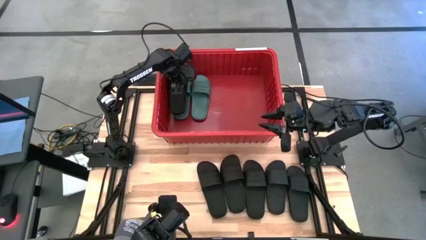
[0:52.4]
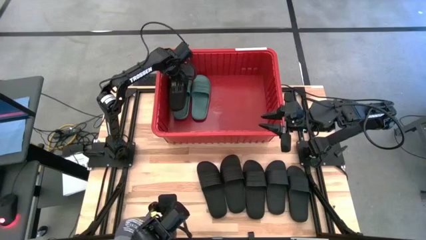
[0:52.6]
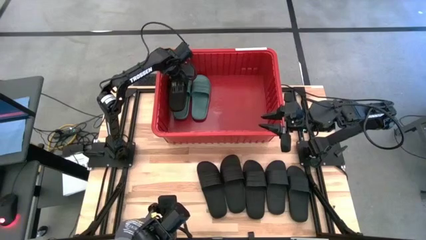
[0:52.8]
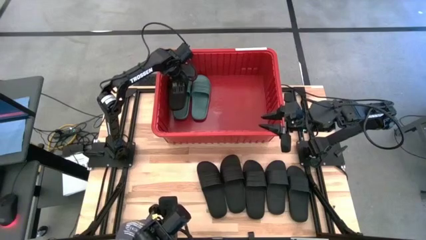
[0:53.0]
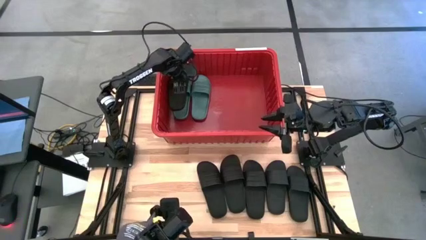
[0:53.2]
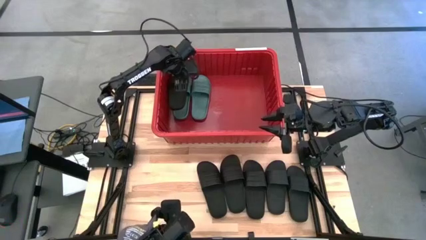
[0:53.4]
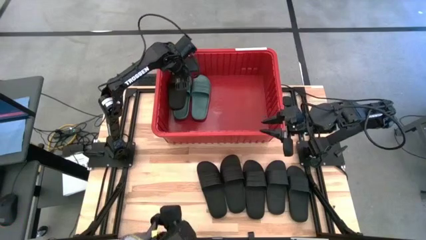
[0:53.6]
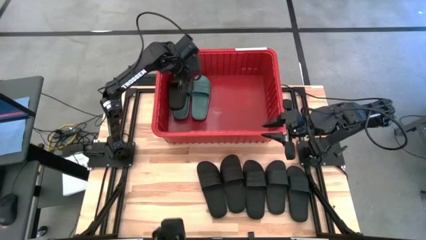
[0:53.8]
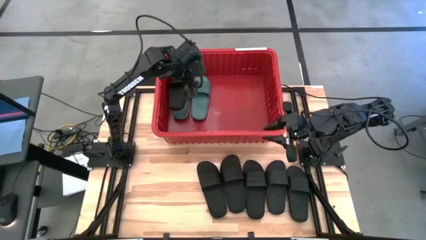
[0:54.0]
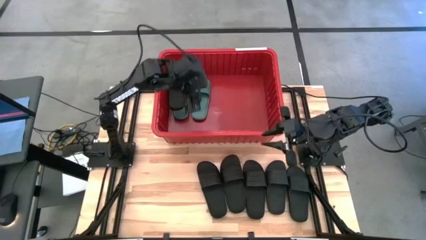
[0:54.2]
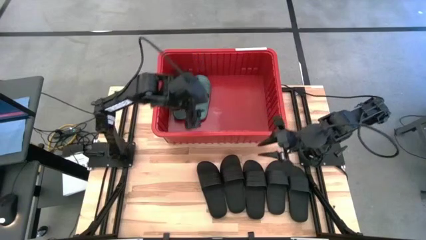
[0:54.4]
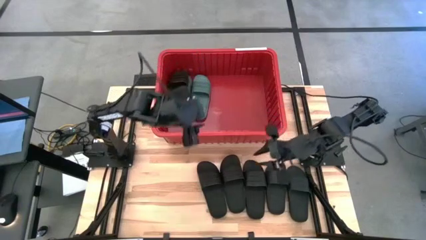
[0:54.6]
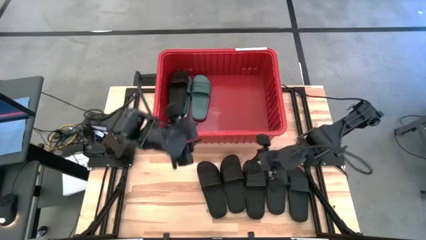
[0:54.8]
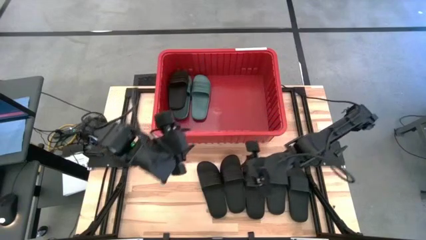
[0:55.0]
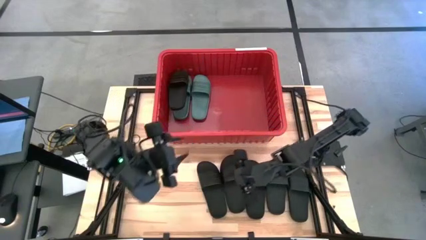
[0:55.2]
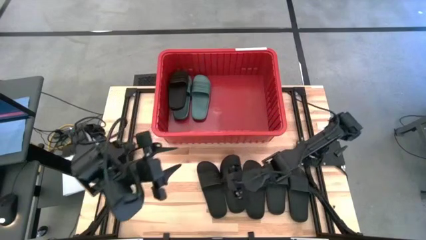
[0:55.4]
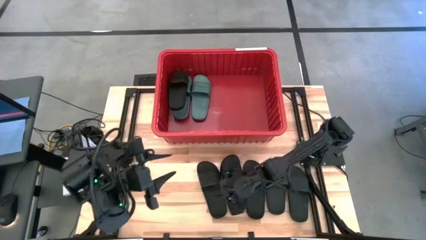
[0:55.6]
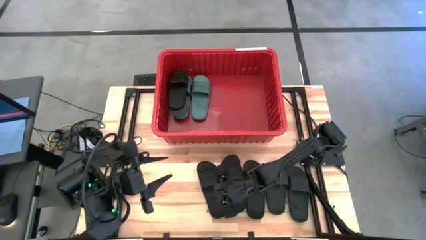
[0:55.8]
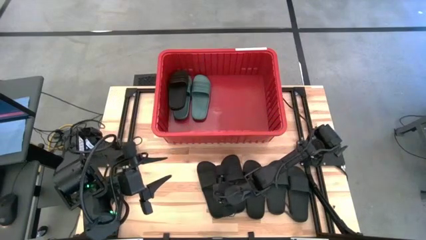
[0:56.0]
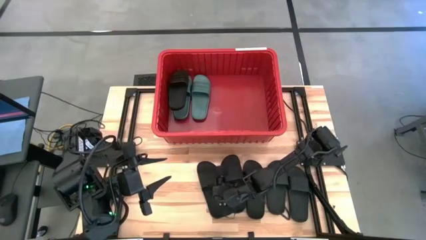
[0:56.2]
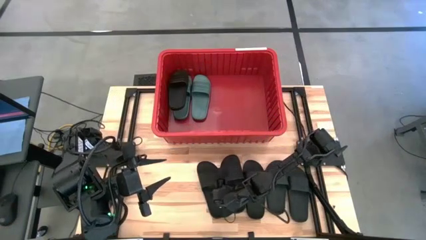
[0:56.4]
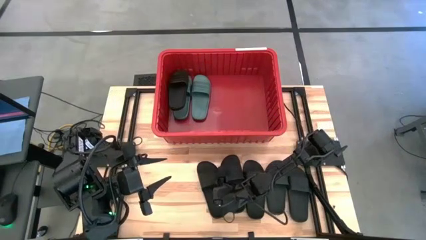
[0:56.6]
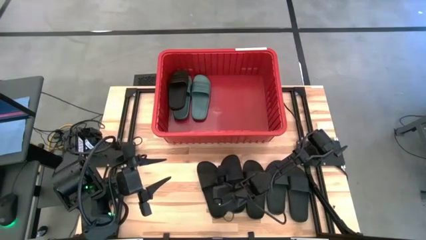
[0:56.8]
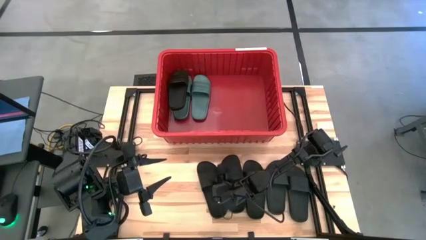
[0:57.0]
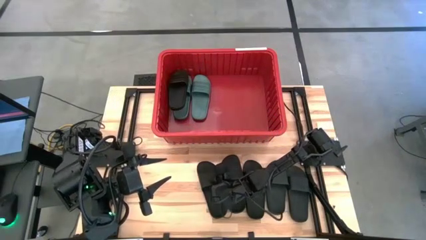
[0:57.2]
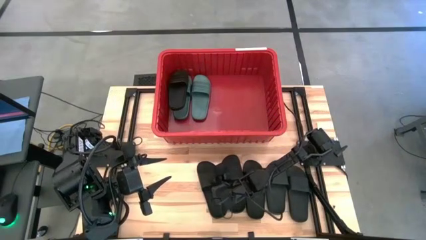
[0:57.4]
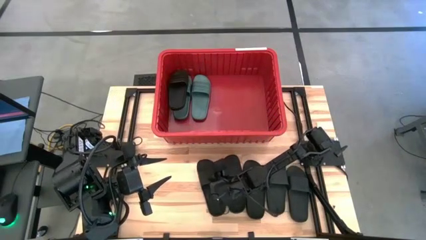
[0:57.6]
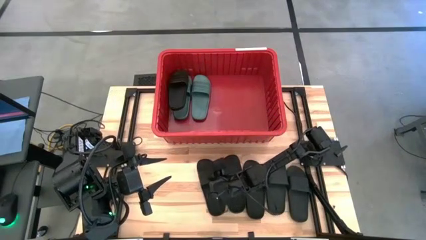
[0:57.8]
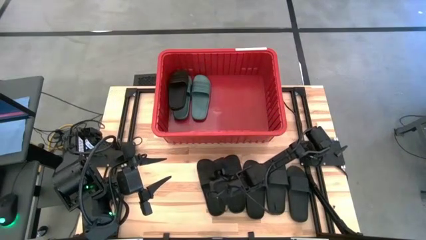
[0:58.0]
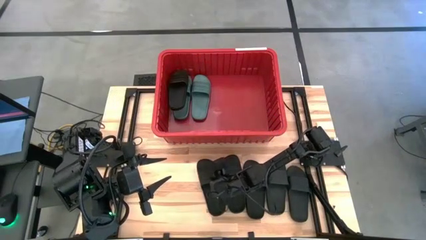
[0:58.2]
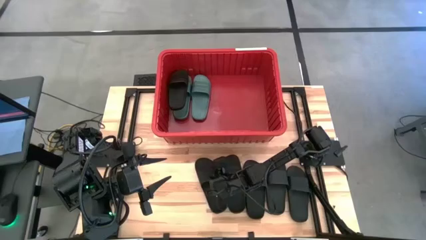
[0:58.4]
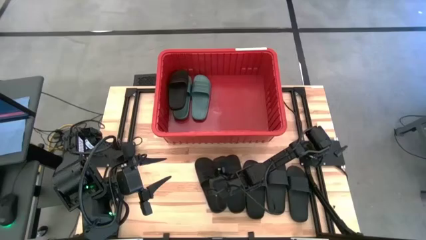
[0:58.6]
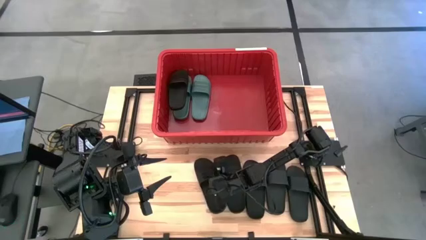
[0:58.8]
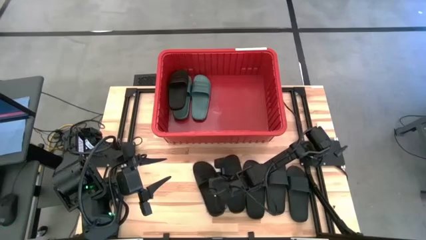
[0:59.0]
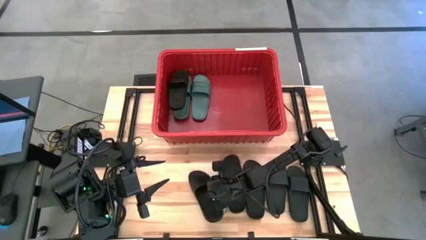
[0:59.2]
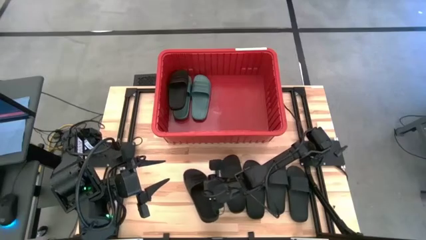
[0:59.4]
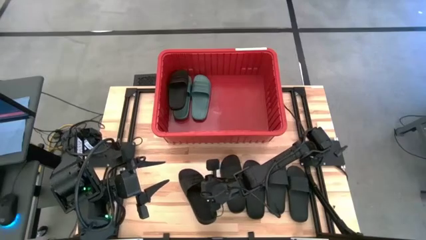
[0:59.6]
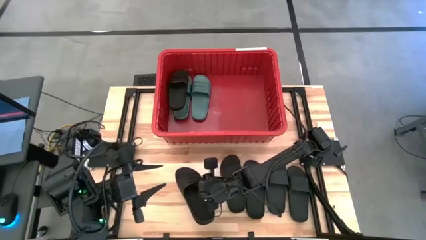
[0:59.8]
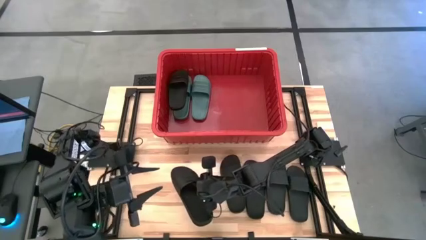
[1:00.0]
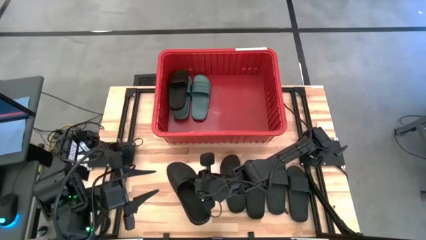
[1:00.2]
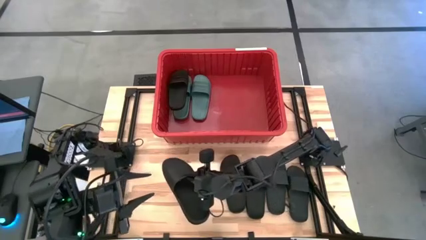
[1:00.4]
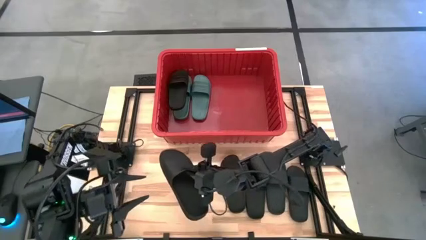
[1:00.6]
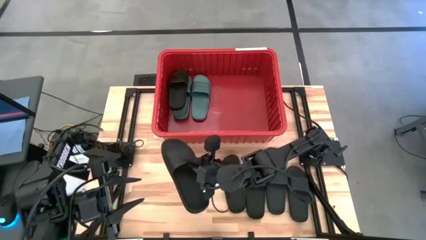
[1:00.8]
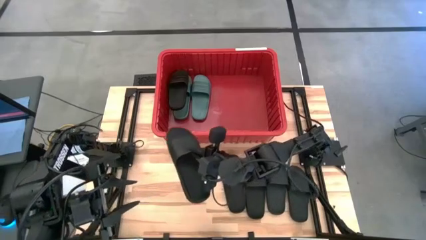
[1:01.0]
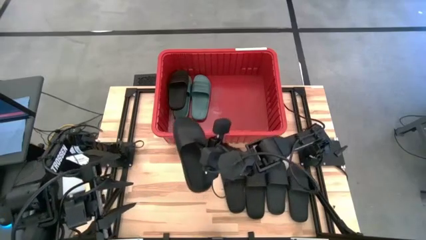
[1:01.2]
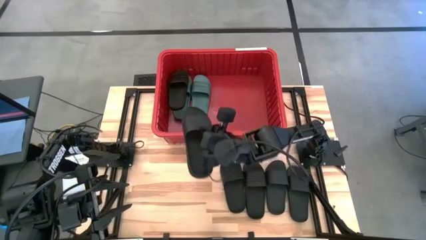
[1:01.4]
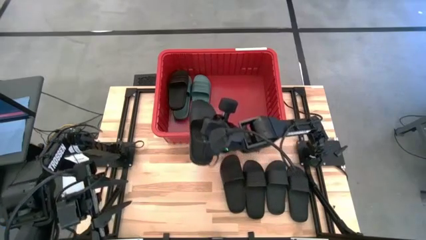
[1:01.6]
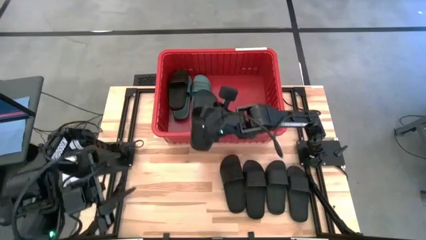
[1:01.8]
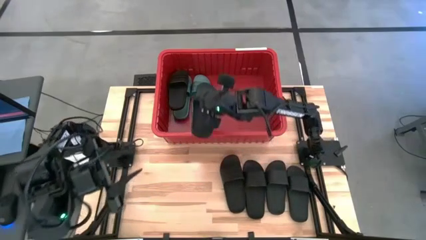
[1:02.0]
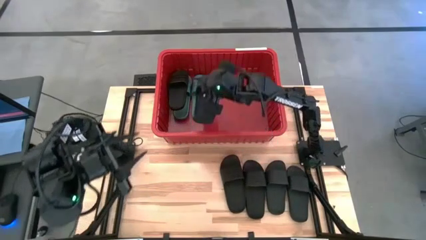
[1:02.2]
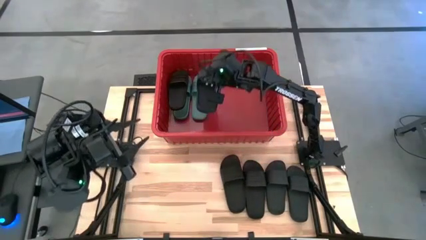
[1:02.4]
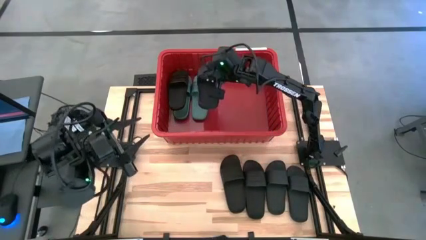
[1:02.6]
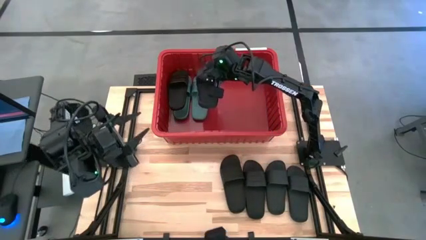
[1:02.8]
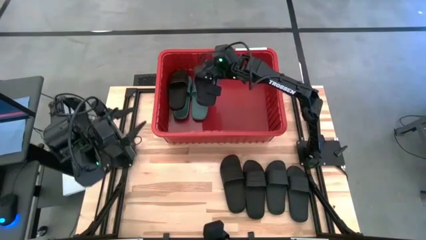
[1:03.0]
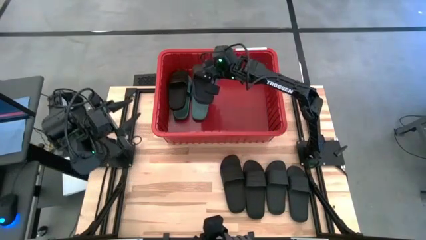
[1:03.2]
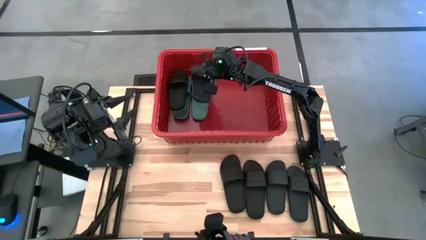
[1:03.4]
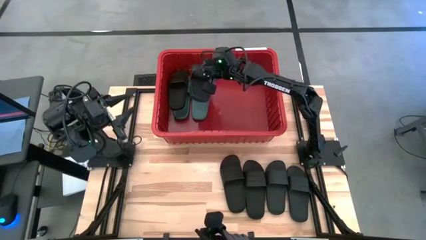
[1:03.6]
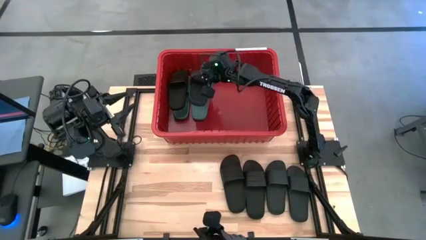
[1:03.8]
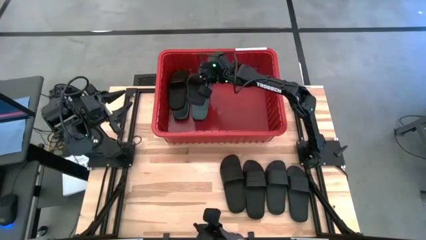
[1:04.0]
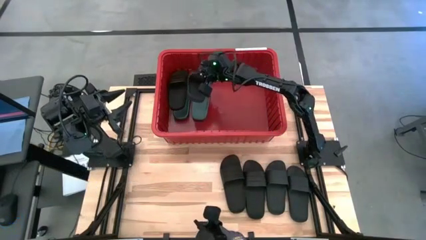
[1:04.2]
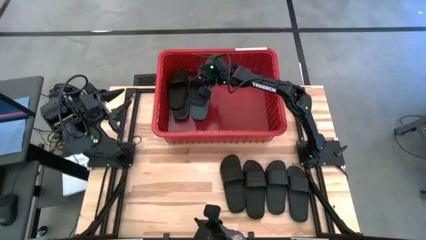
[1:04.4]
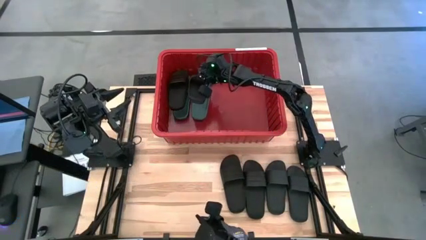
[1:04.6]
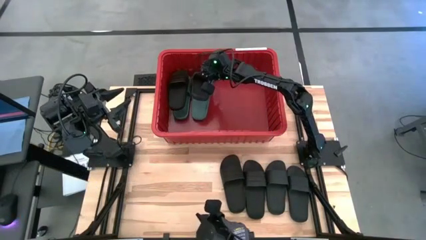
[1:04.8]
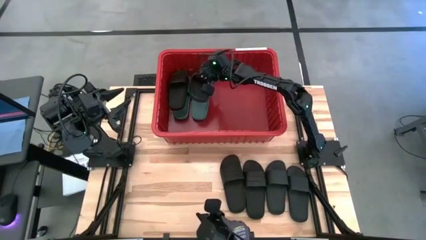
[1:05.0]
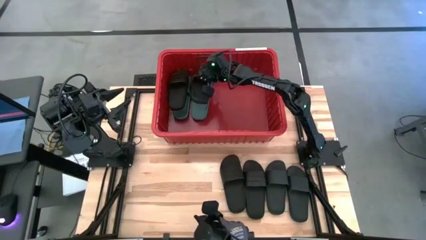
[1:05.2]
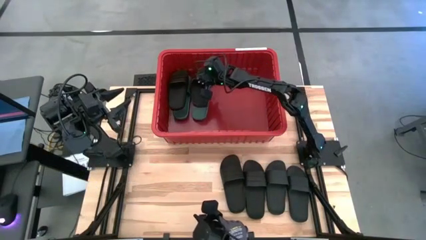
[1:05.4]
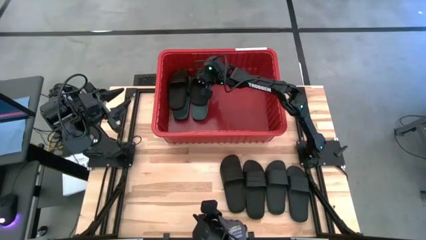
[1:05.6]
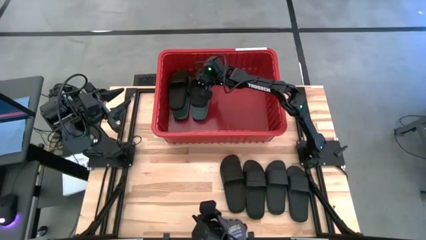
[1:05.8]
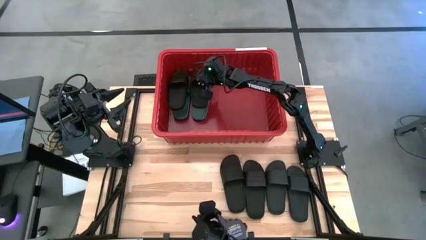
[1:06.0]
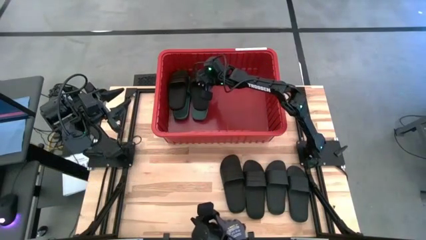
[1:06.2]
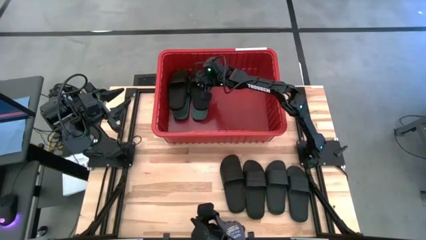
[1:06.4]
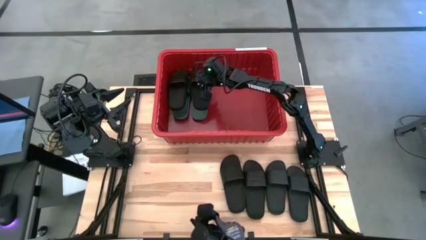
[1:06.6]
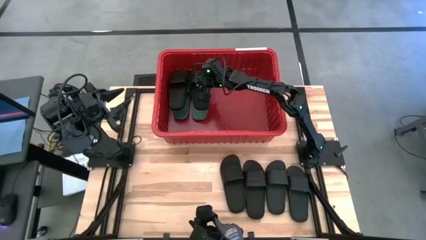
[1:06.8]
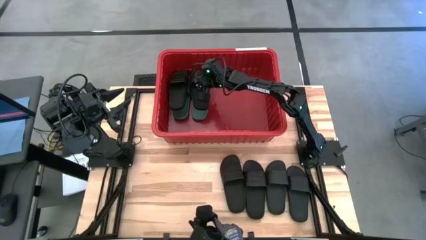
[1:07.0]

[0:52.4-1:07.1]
Task: Pick and place slides into bin
Put the black slide into the red bin

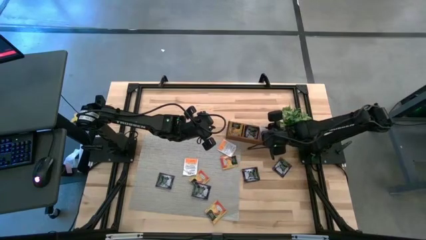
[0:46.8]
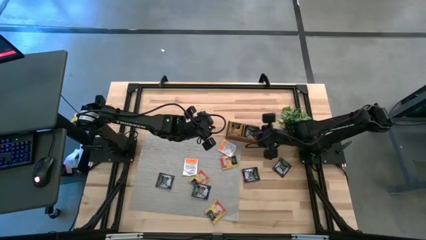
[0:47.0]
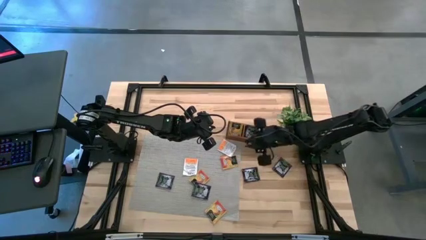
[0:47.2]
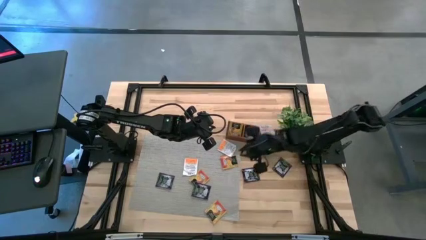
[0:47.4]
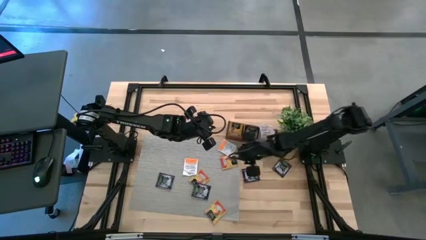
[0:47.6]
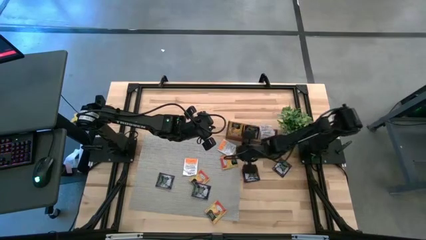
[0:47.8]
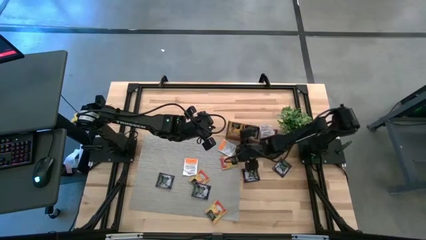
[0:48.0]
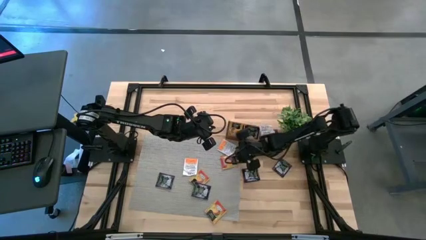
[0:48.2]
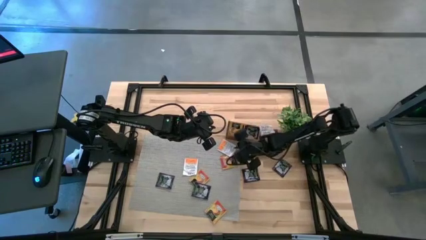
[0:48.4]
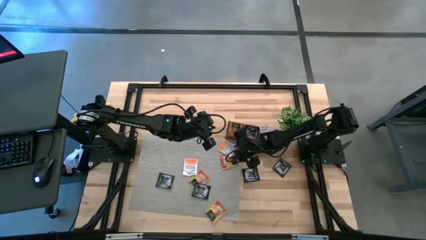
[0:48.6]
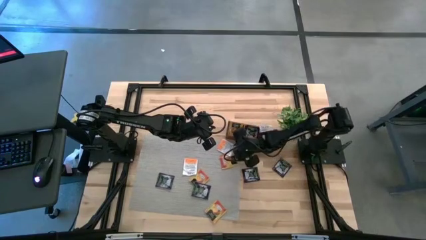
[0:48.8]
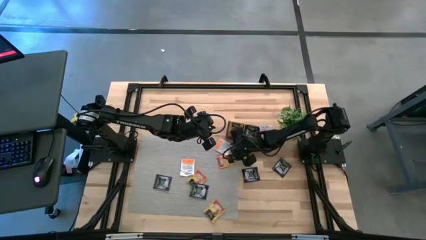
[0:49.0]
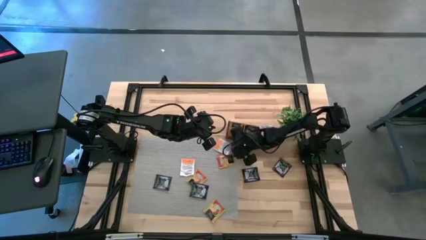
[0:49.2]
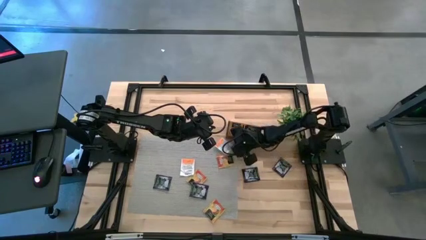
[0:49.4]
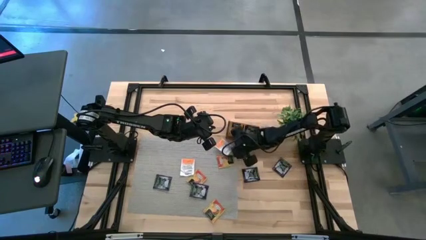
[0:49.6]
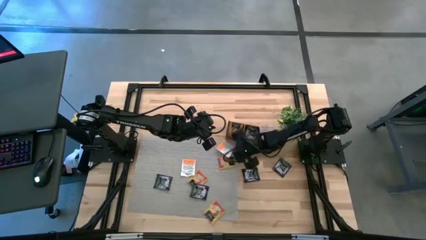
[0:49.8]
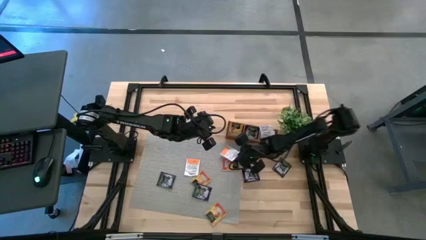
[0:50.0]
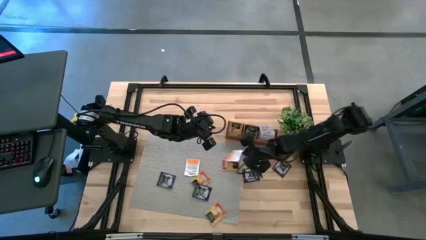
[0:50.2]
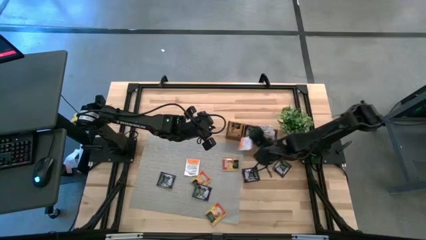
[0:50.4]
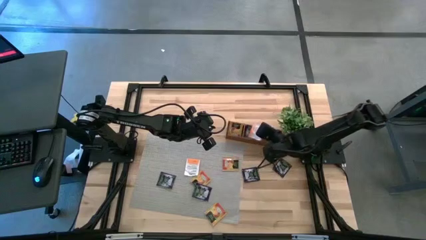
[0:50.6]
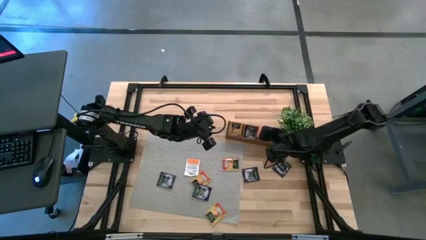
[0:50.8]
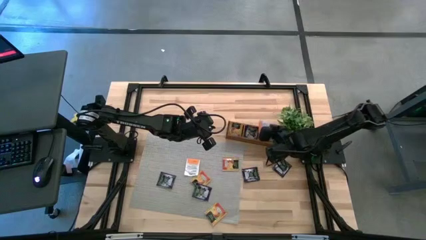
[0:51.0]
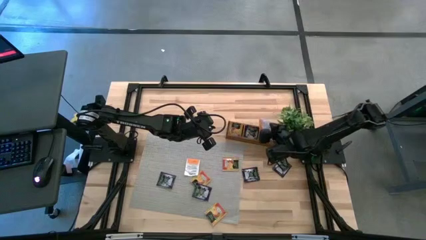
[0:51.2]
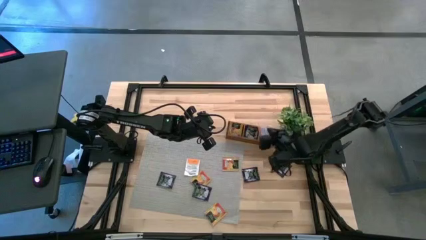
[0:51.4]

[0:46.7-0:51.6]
Task: Pick & Place Tea
Put the white orange tea bag in the right section of the wooden organizer
